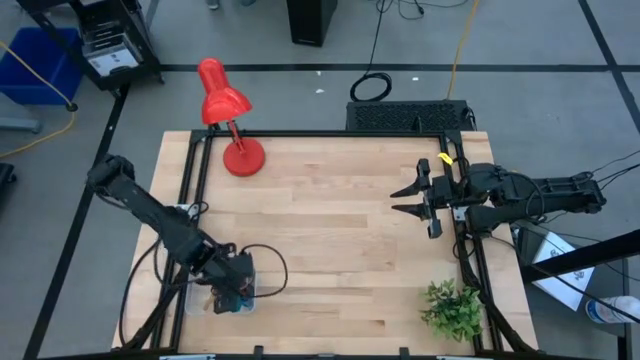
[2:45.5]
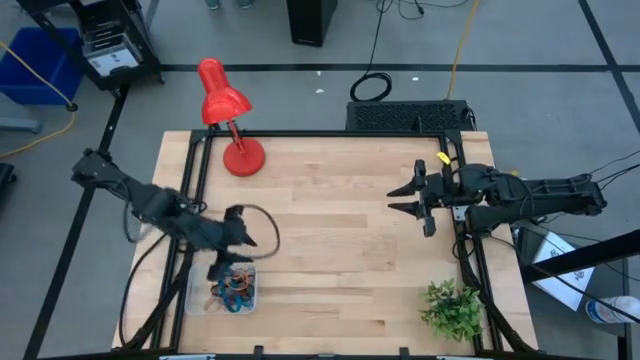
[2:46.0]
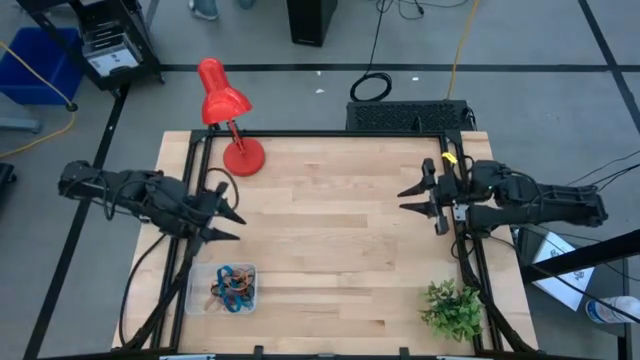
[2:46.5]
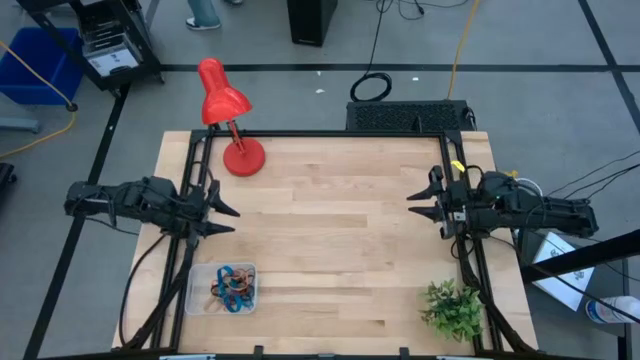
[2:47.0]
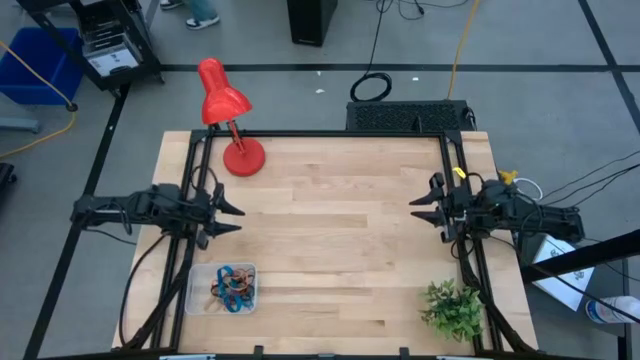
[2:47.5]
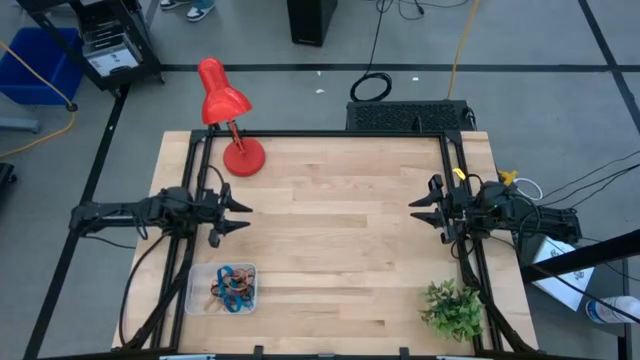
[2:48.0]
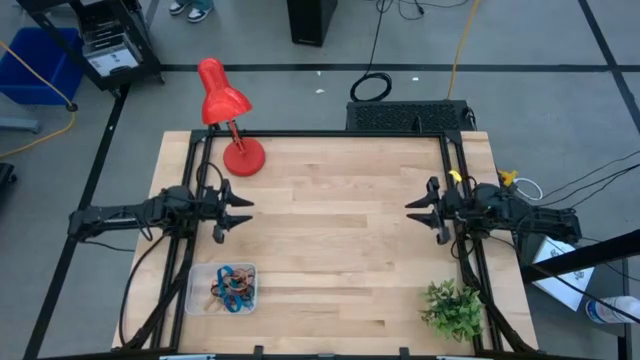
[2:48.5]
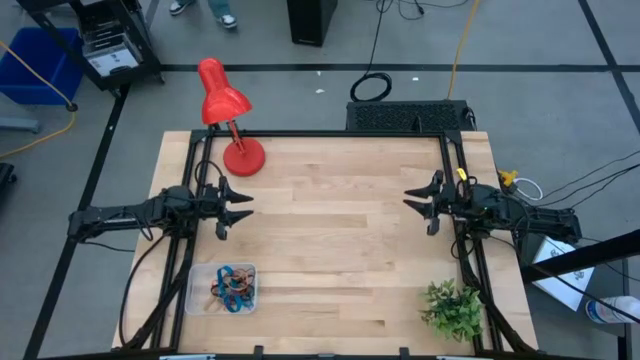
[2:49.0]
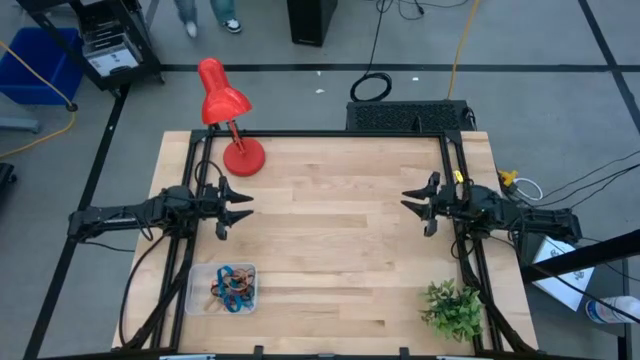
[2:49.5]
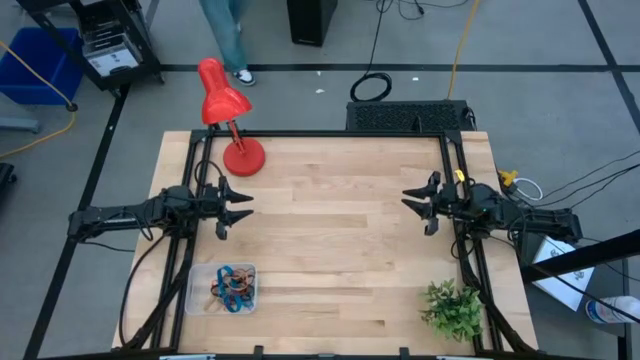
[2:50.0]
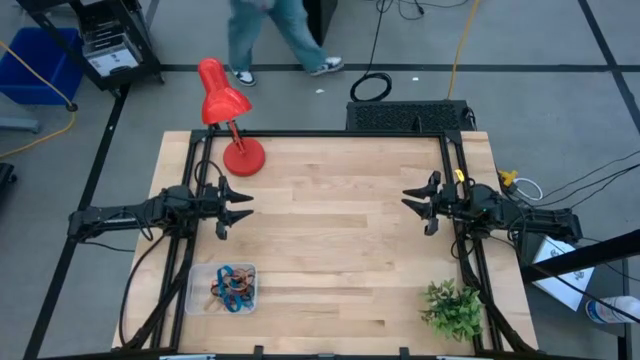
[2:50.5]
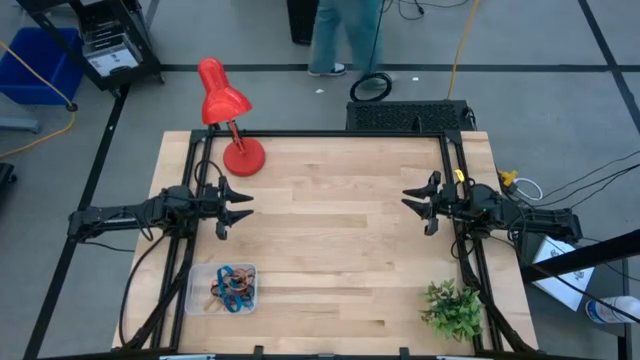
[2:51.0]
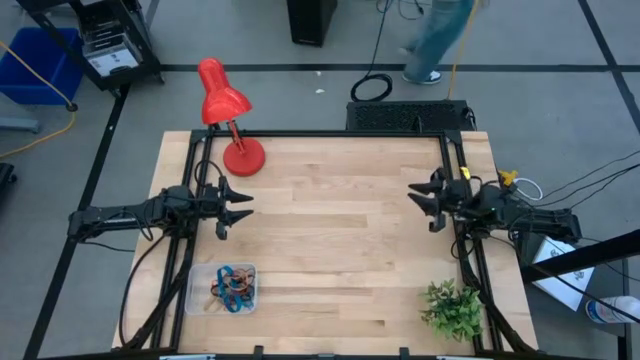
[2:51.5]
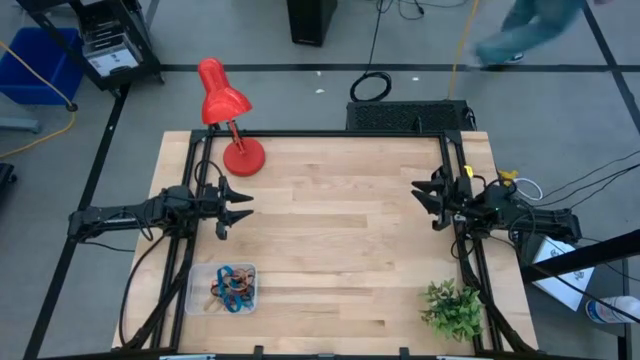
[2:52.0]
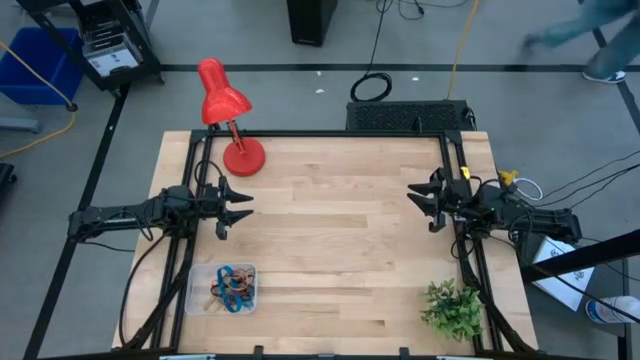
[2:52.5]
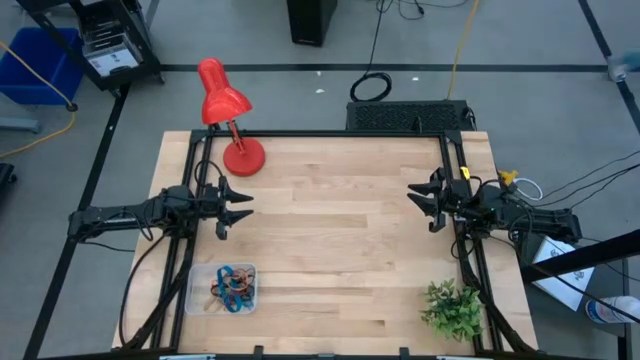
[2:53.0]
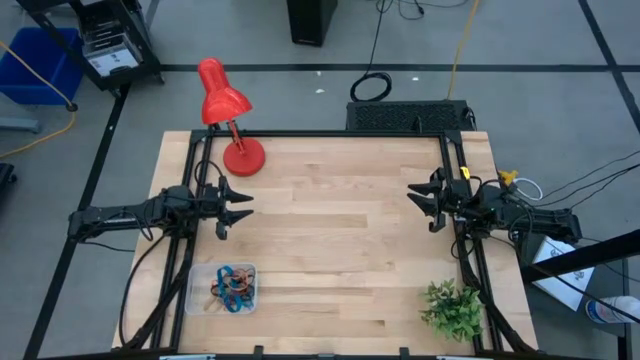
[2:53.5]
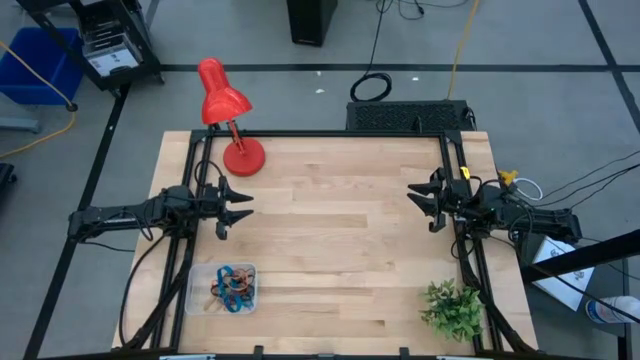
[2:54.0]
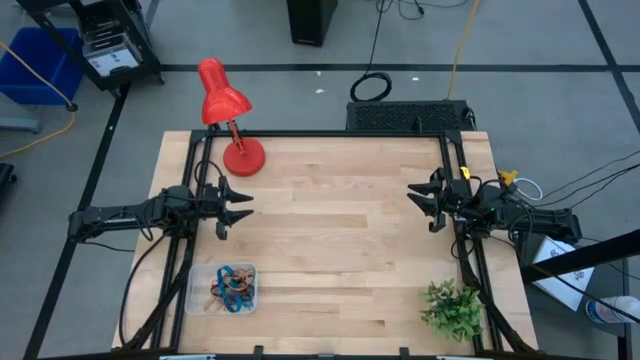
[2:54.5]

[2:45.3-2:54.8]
Task: Pick and place rubber bands into bin
Return to Home Position

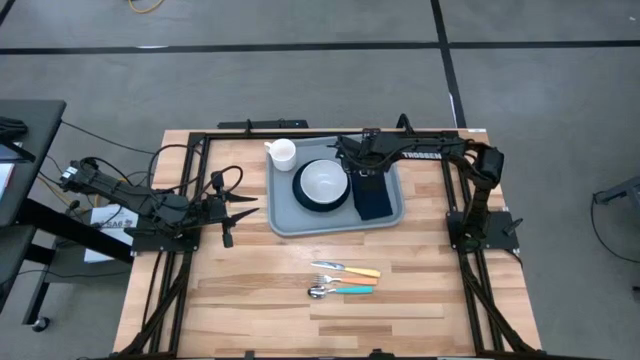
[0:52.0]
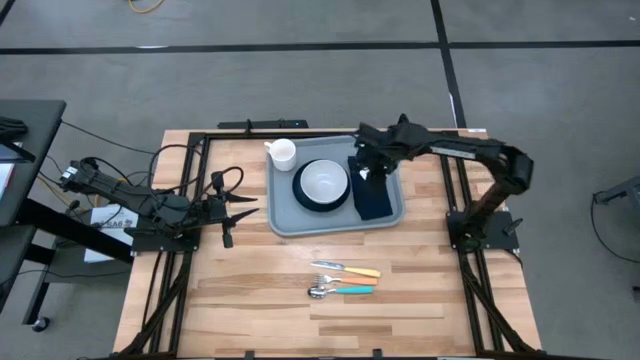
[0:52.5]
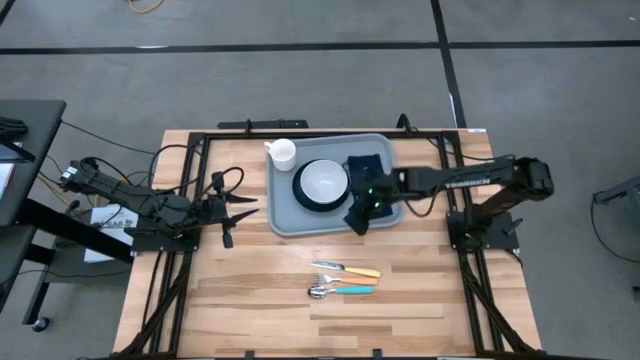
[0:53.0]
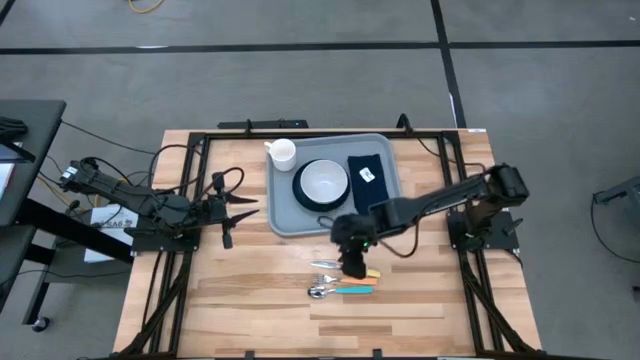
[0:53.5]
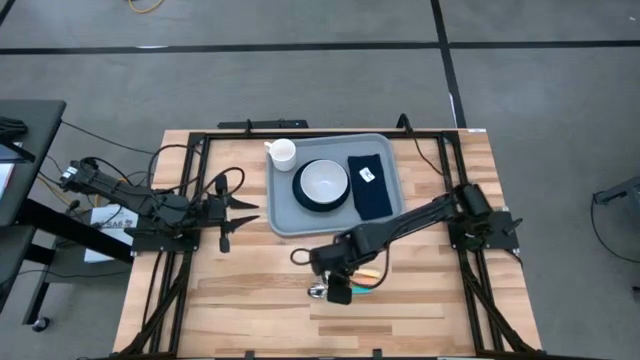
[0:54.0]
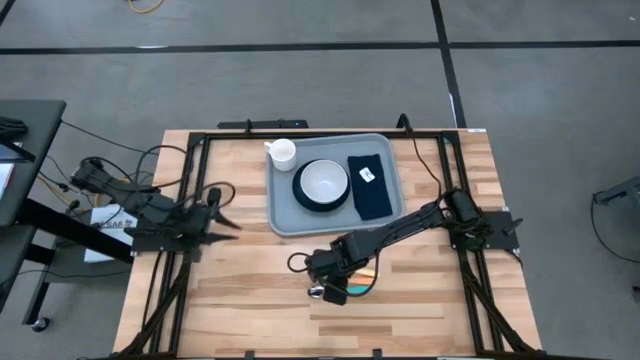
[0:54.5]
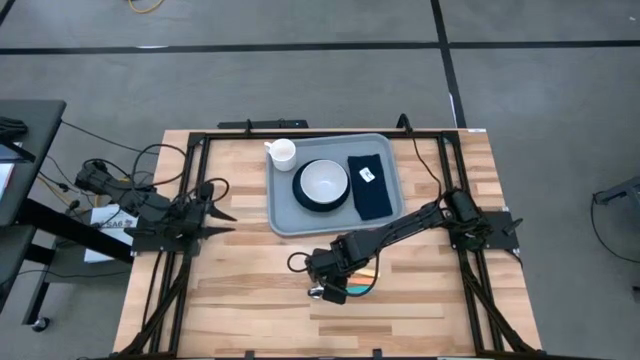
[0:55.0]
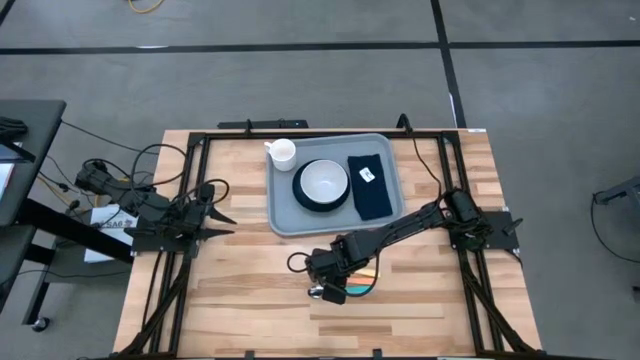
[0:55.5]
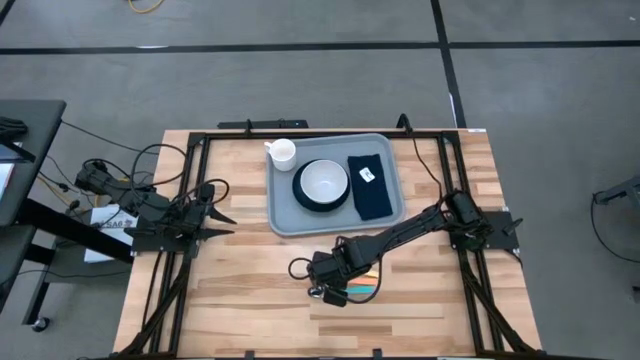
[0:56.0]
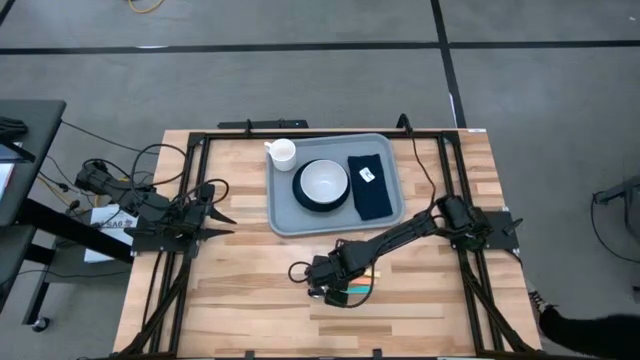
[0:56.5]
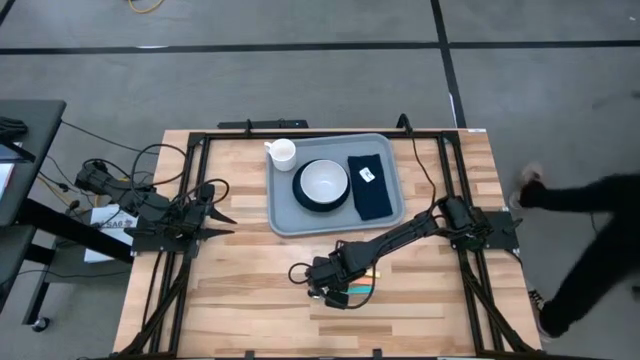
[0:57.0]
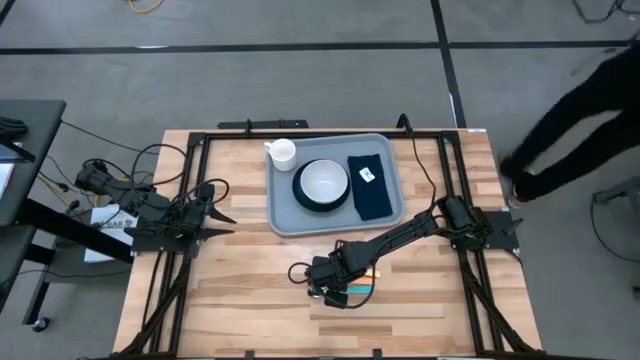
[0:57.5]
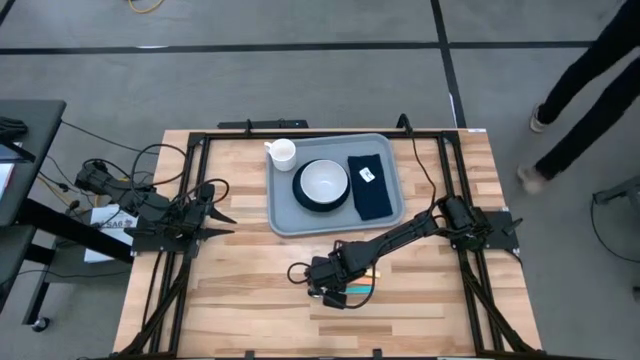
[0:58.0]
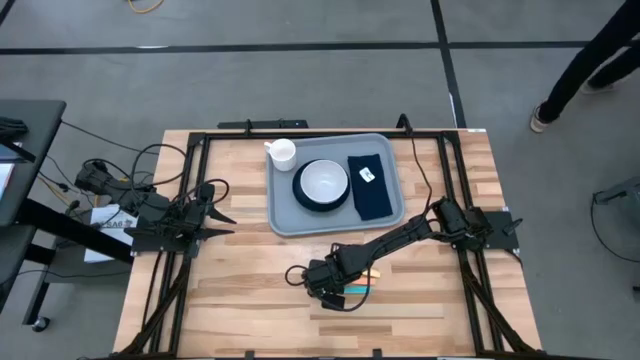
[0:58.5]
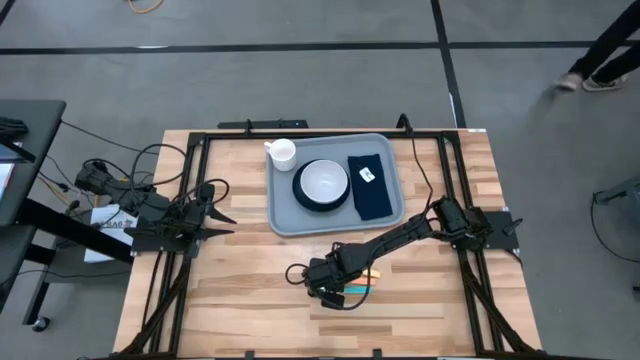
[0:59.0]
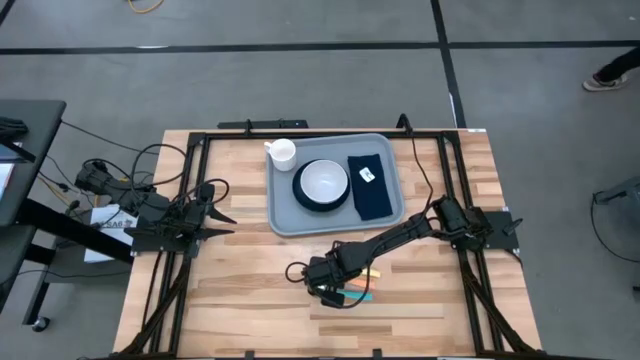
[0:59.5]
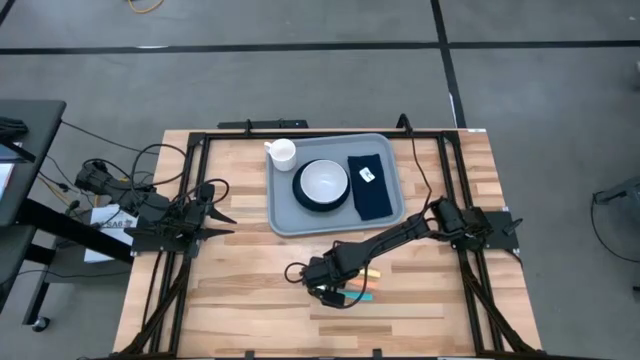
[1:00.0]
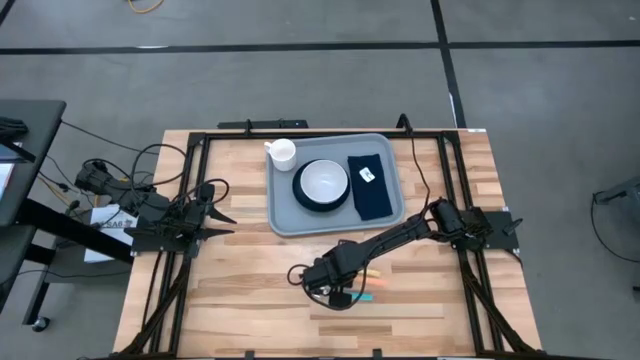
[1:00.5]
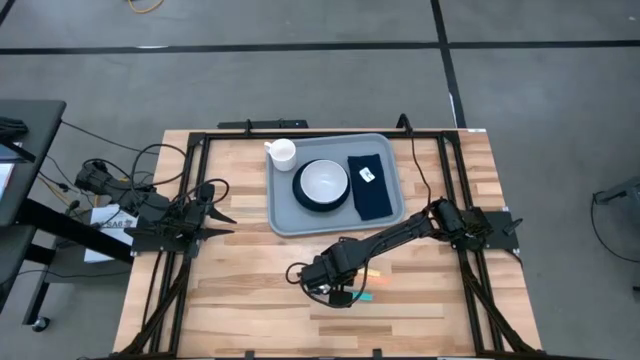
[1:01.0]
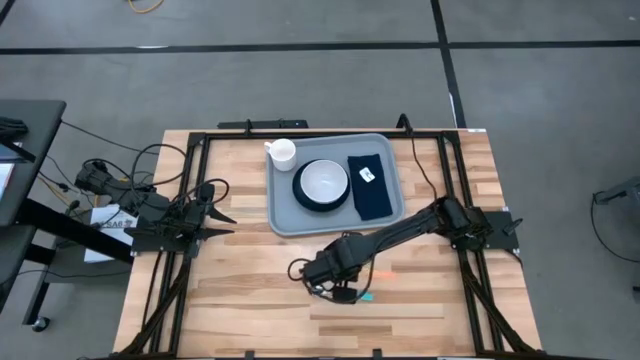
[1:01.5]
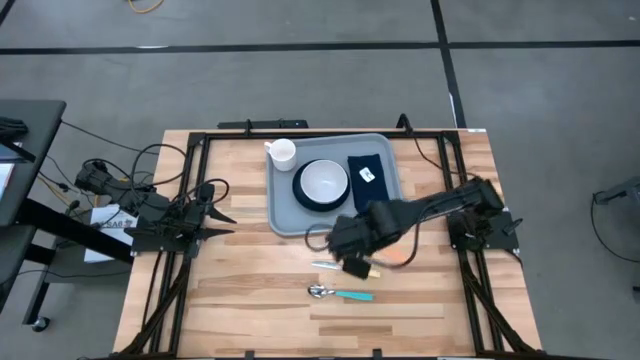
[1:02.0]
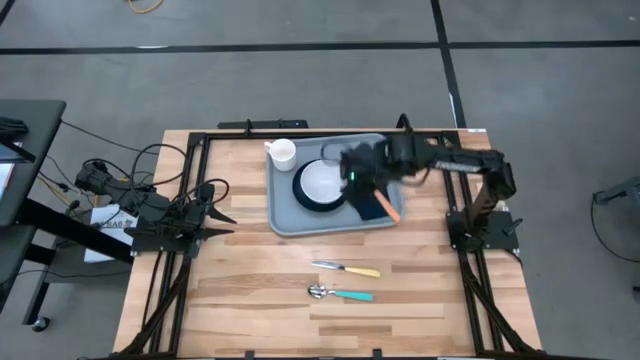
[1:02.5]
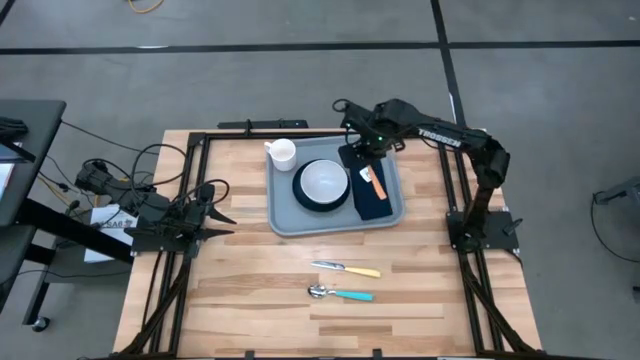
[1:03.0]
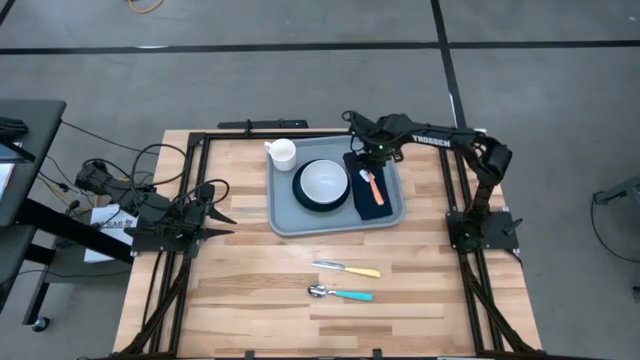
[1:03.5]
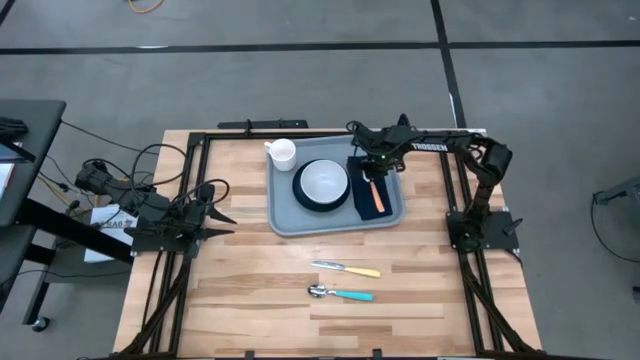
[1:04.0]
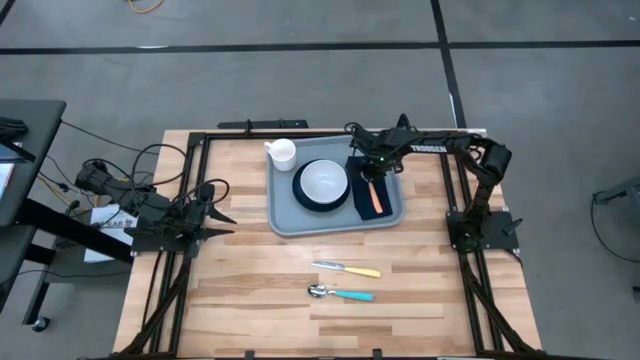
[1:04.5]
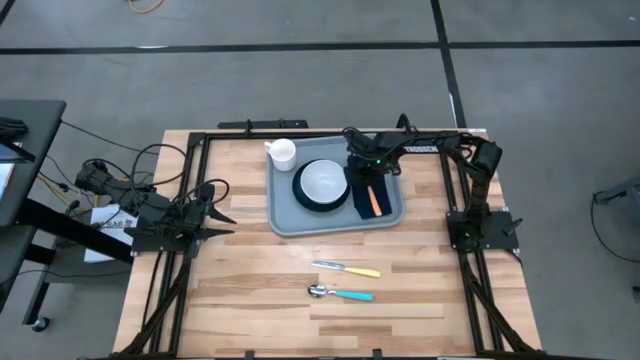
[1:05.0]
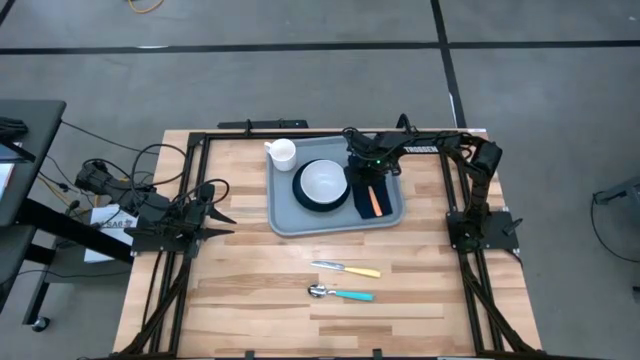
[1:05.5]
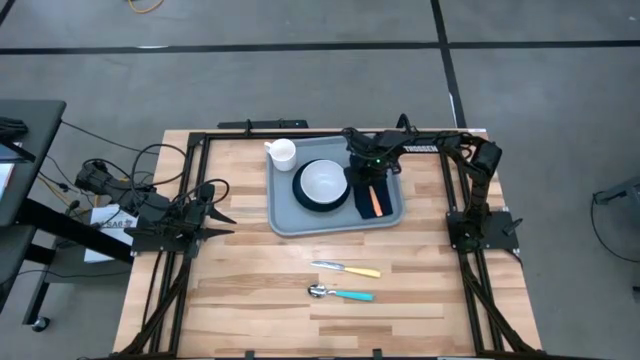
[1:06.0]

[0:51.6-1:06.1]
Task: Set up tray
Put the orange fork on the dark blue napkin to the right of the black plate
